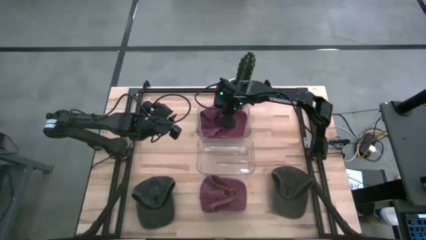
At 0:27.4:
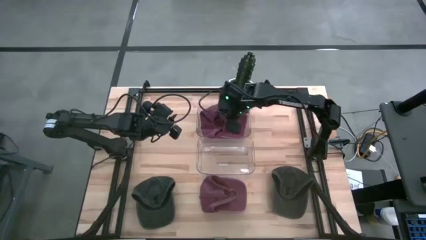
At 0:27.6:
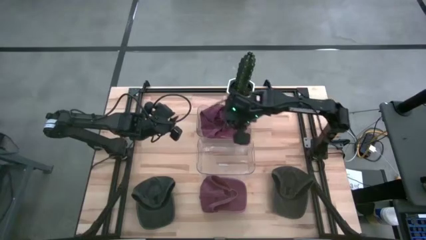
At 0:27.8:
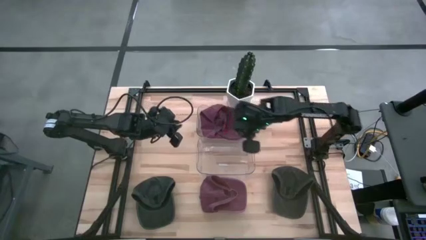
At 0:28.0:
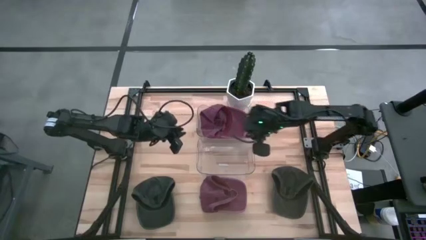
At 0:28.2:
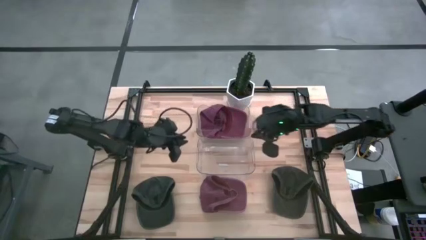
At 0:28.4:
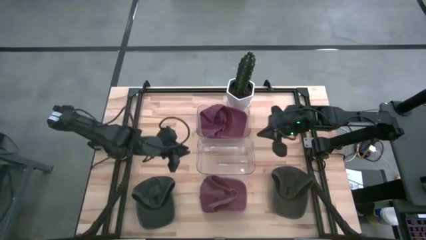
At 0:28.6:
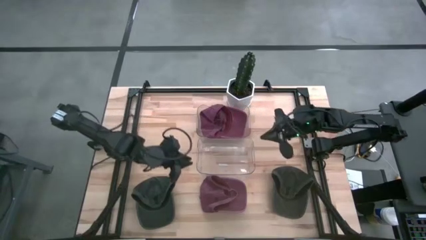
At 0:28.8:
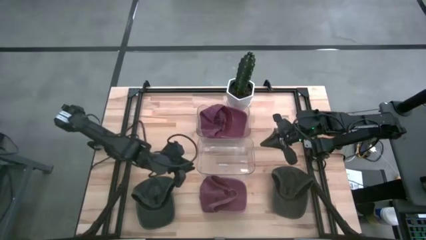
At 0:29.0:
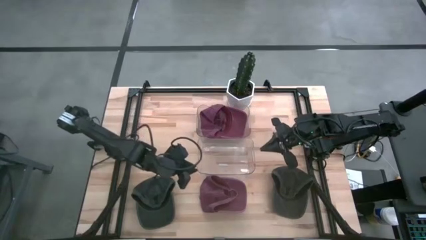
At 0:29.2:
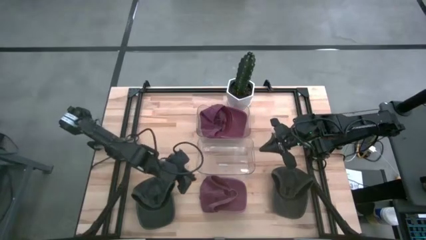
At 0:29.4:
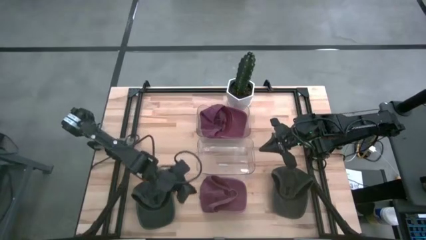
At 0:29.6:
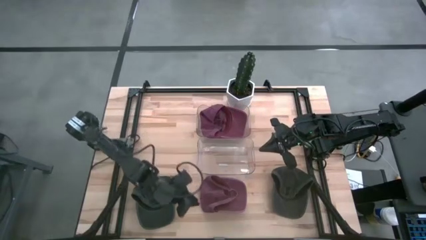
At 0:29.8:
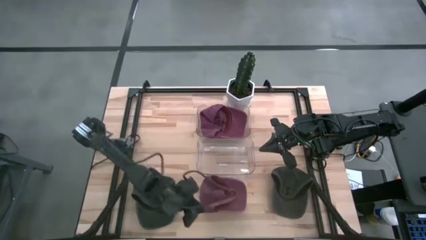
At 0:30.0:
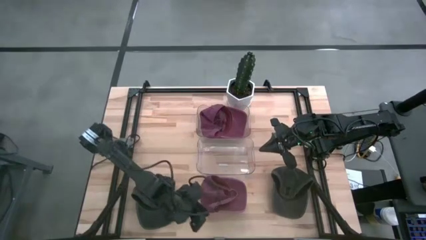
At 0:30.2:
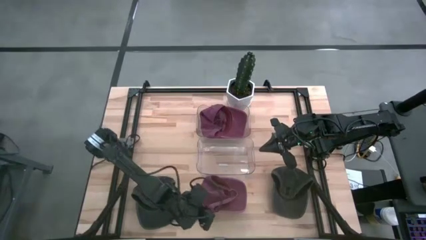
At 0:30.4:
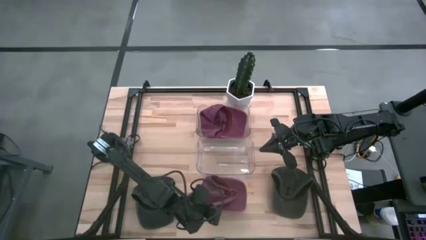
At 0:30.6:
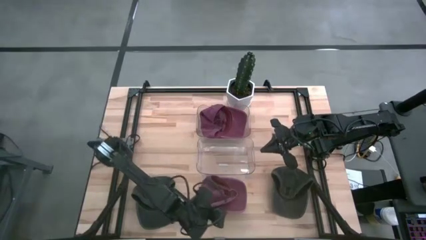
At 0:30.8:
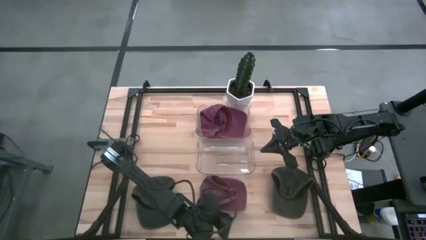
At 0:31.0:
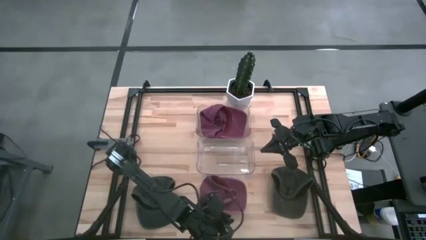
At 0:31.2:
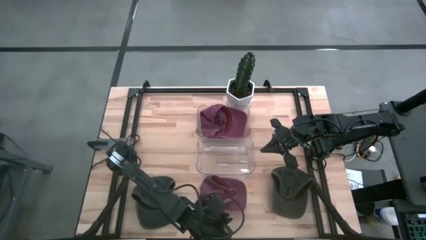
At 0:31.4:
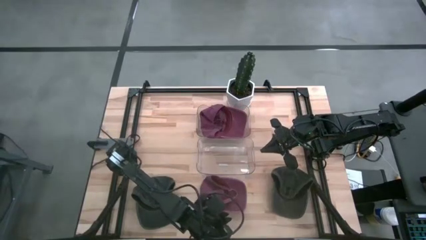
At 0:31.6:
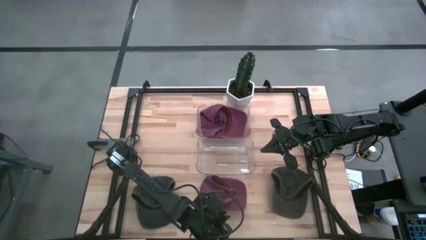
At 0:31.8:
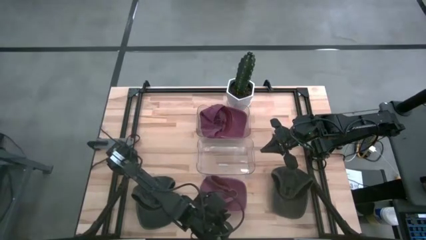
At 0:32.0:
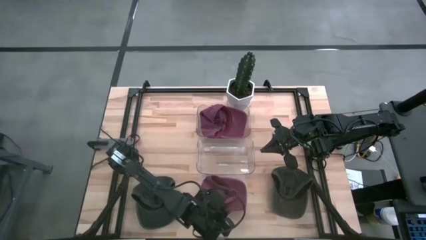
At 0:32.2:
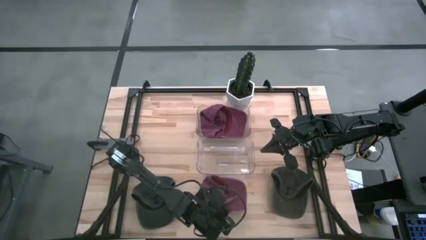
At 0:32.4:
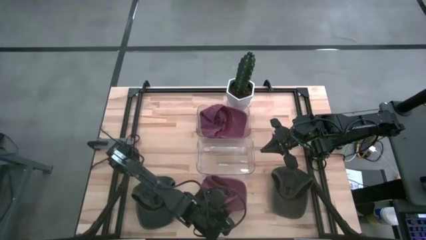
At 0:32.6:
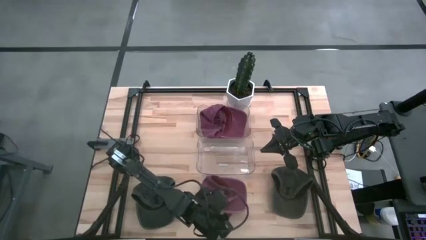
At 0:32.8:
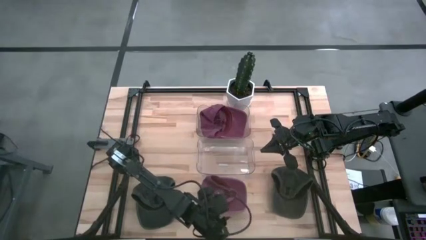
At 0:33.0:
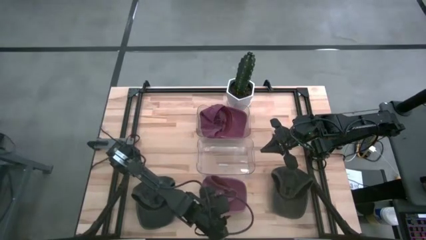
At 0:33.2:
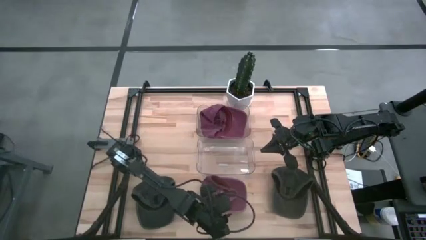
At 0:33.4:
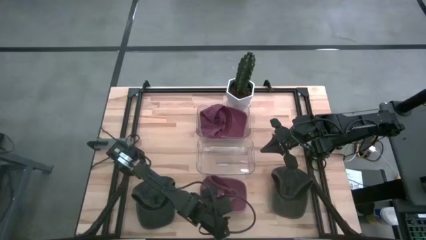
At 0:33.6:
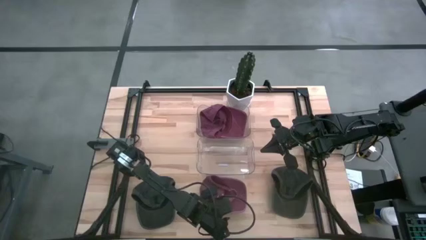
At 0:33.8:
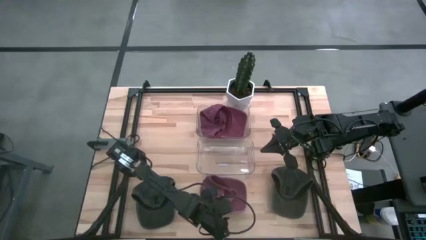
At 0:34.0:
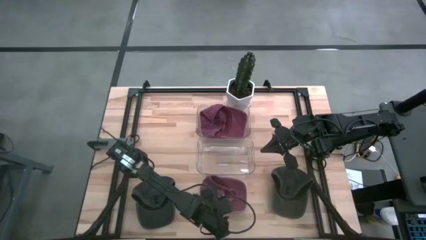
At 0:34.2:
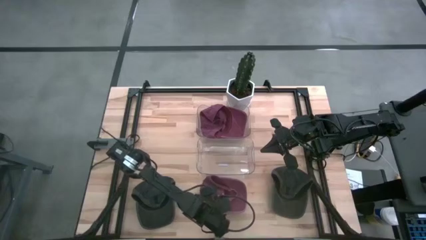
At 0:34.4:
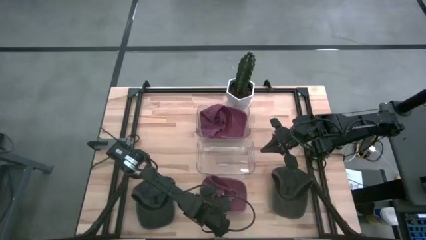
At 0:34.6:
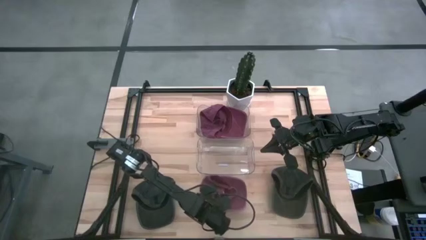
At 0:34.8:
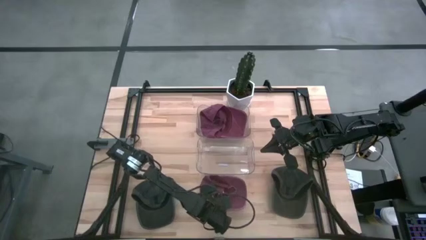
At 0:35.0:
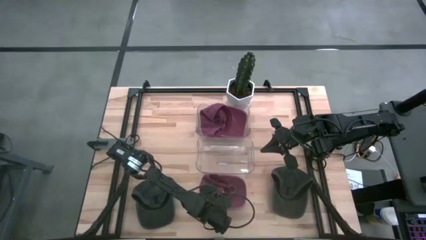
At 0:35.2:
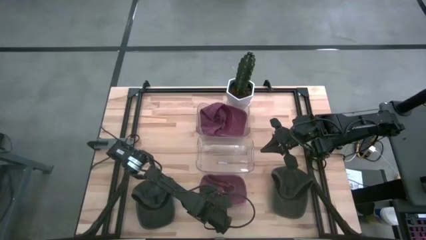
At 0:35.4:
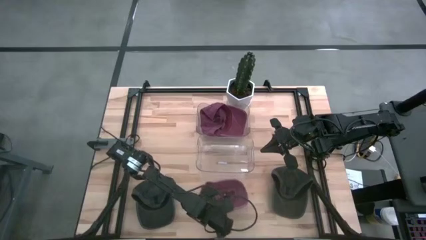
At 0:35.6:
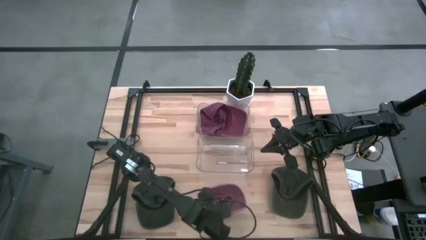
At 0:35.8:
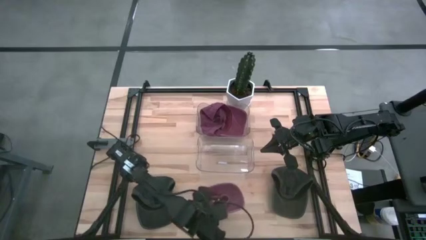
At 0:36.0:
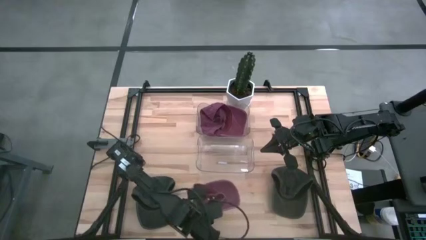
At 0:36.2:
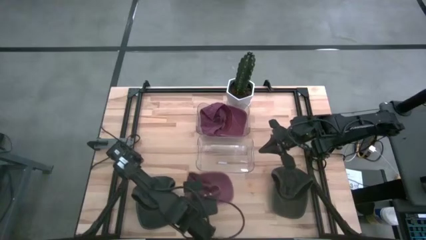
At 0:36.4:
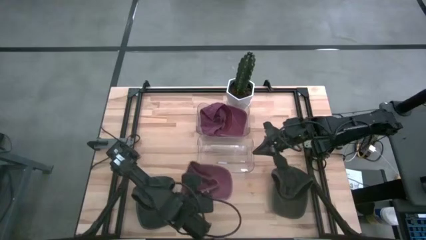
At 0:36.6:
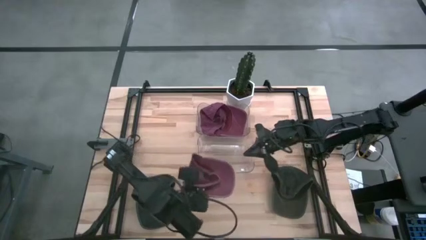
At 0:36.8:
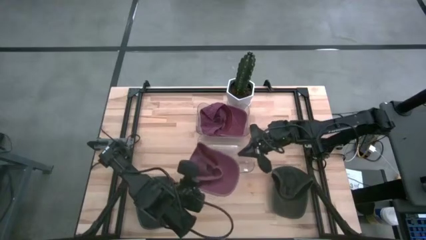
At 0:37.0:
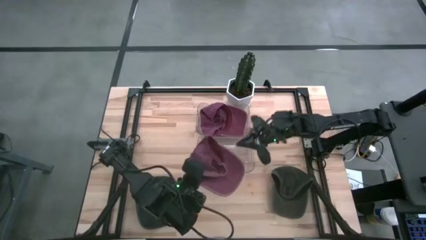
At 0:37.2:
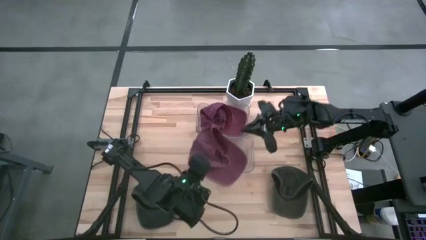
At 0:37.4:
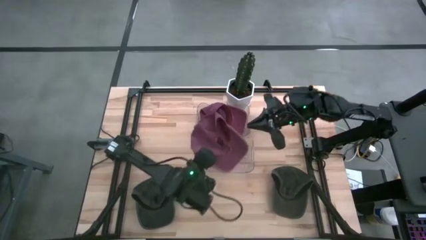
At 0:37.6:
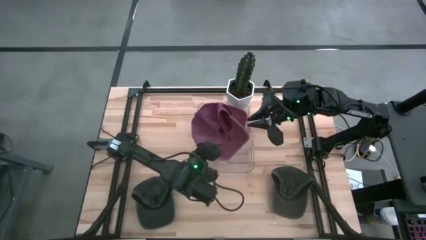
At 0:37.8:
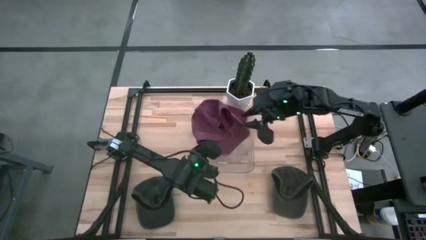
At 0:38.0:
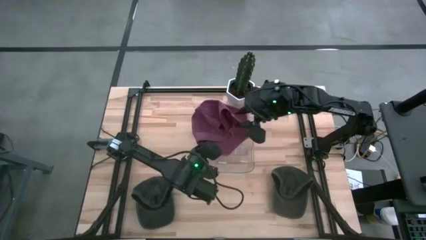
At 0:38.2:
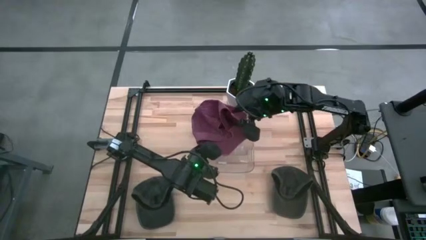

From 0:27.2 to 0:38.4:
Task: Pick & Place hat
Put the red cap into the top transparent bin
